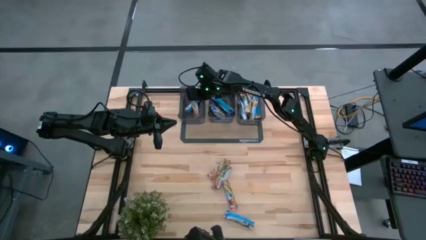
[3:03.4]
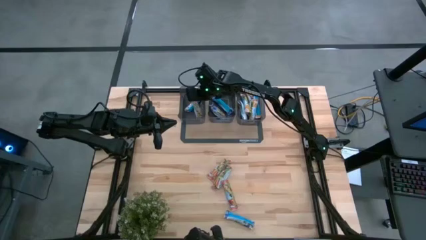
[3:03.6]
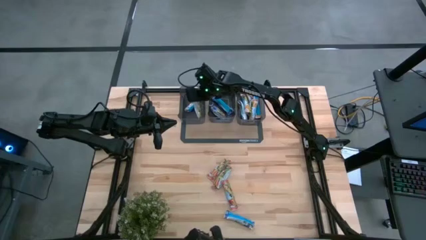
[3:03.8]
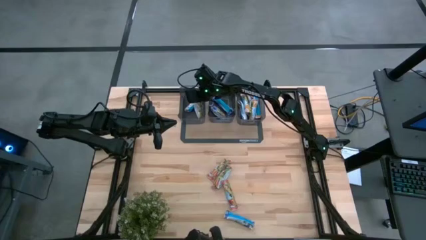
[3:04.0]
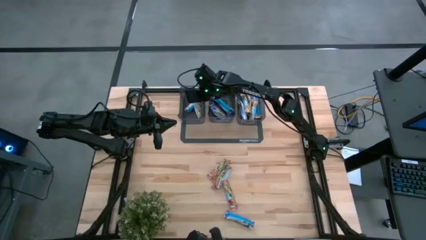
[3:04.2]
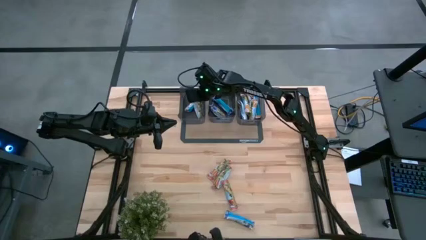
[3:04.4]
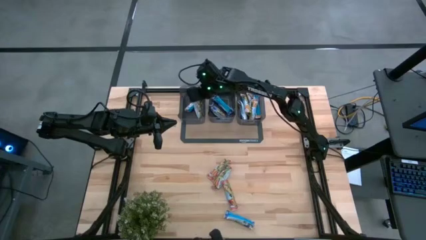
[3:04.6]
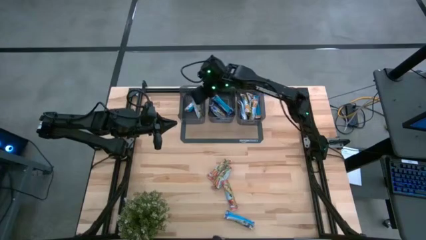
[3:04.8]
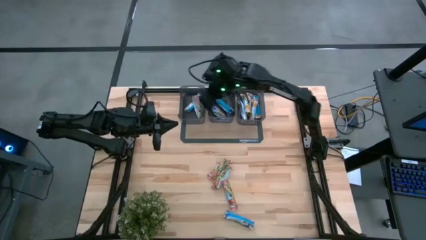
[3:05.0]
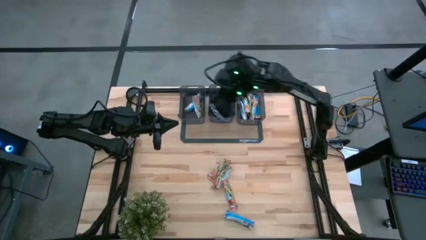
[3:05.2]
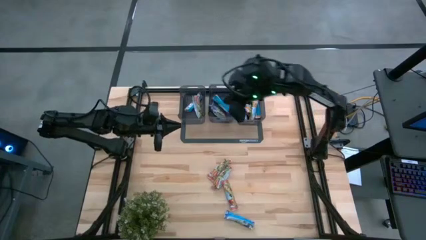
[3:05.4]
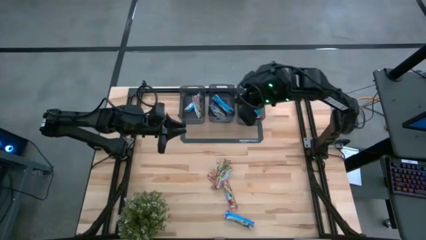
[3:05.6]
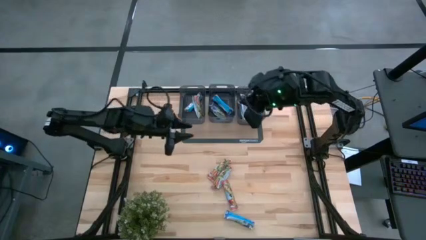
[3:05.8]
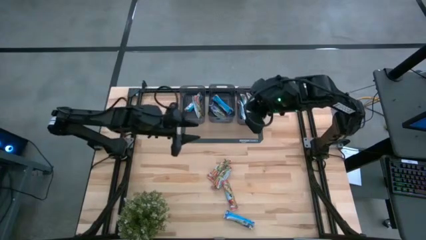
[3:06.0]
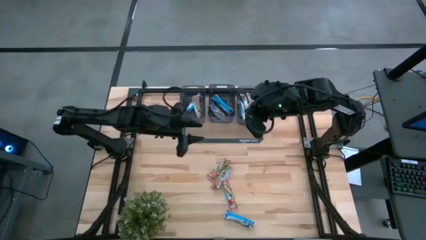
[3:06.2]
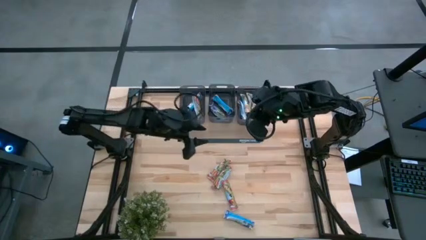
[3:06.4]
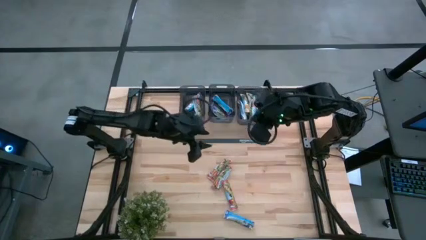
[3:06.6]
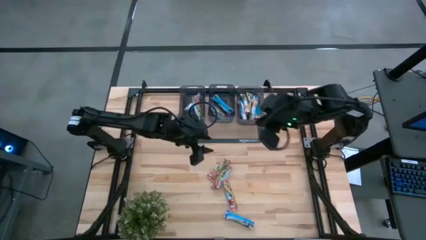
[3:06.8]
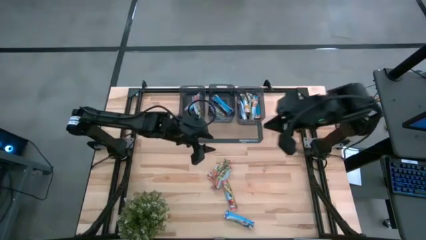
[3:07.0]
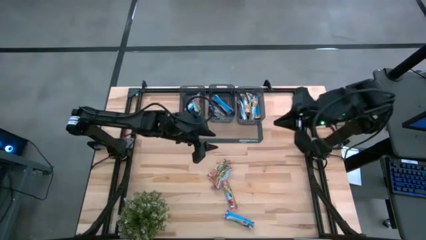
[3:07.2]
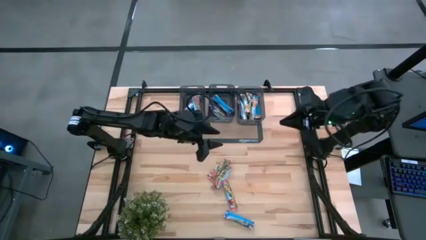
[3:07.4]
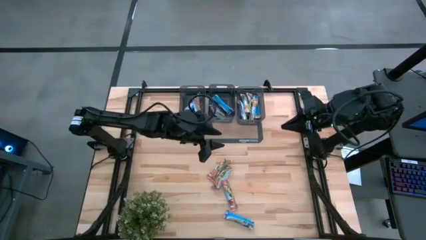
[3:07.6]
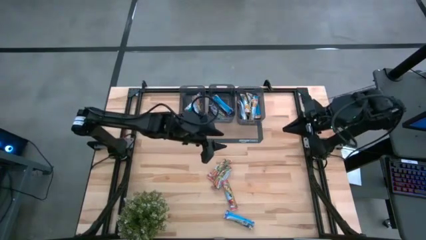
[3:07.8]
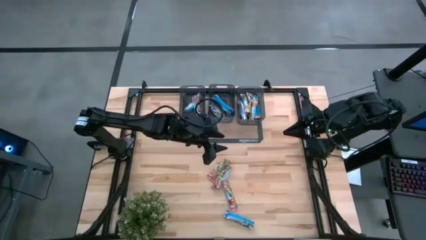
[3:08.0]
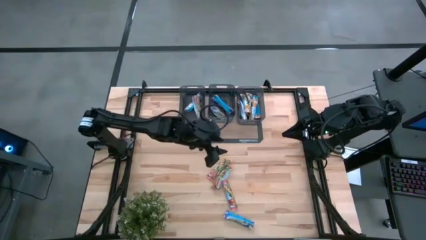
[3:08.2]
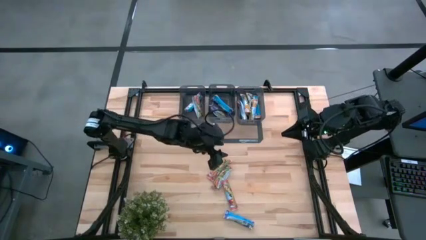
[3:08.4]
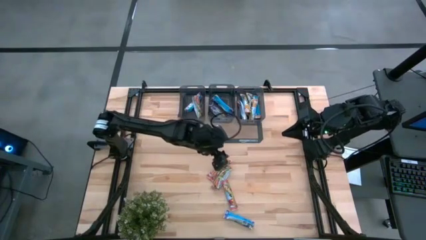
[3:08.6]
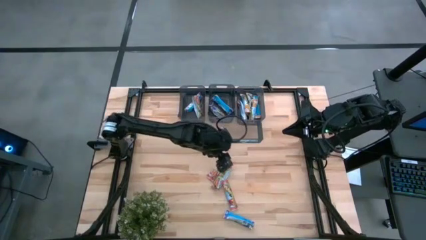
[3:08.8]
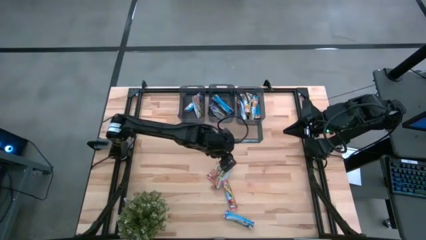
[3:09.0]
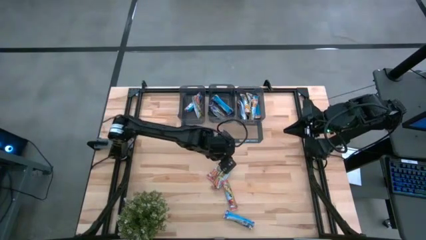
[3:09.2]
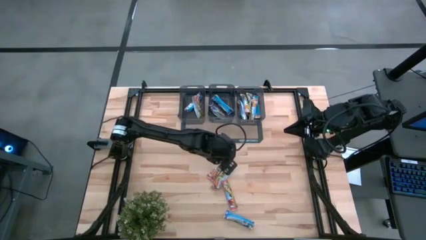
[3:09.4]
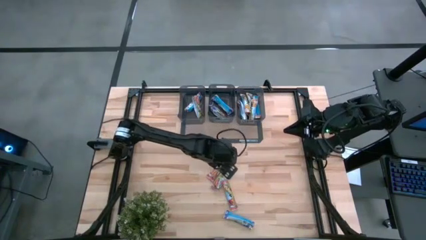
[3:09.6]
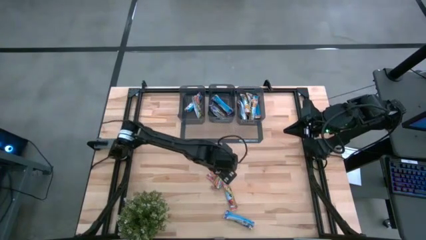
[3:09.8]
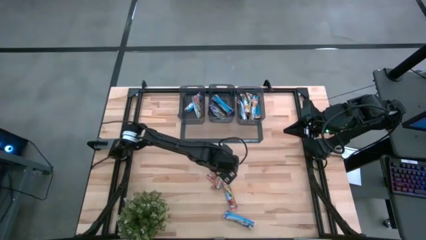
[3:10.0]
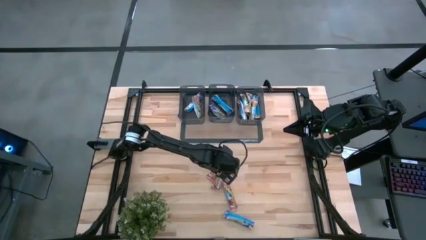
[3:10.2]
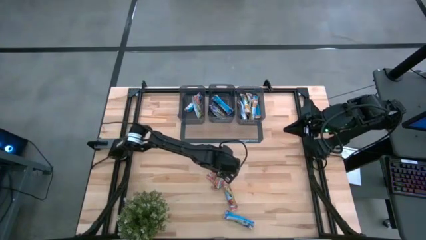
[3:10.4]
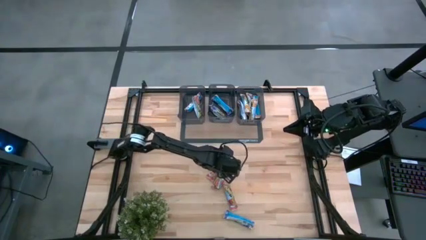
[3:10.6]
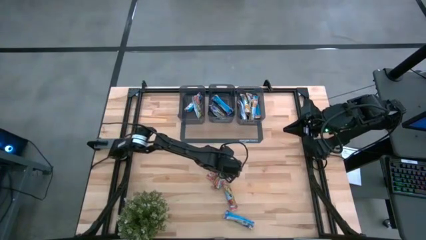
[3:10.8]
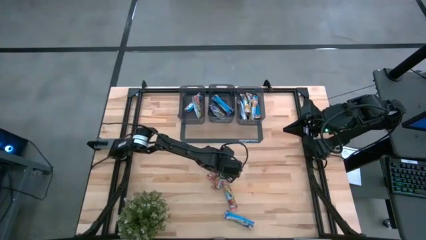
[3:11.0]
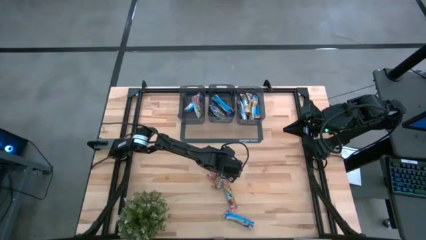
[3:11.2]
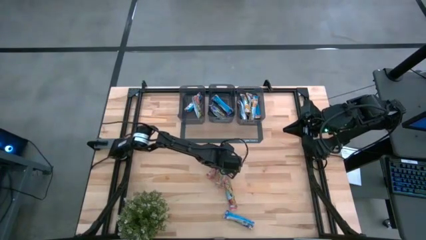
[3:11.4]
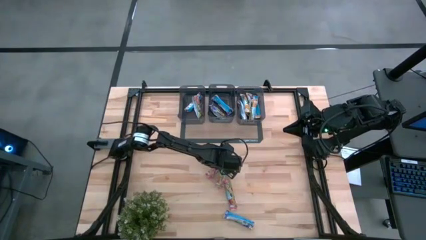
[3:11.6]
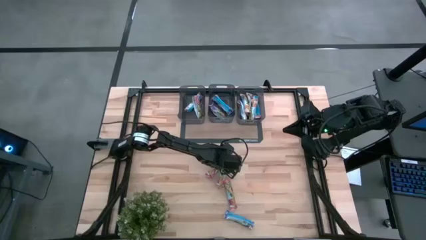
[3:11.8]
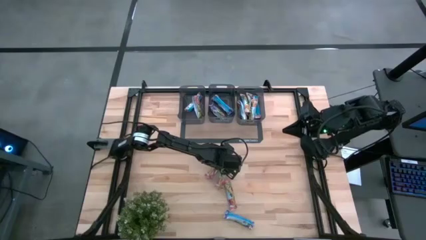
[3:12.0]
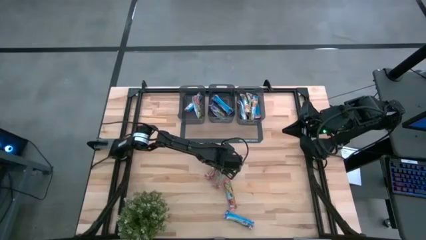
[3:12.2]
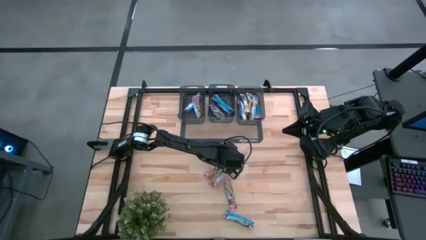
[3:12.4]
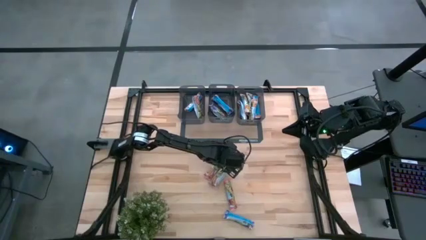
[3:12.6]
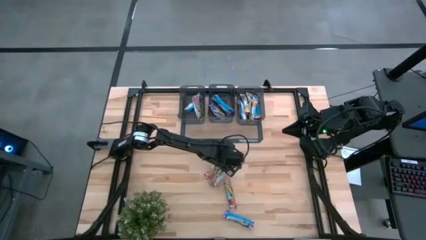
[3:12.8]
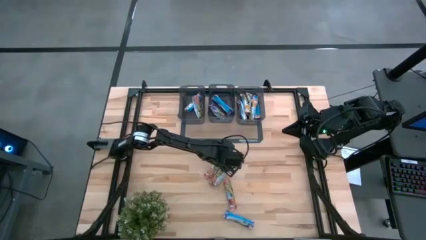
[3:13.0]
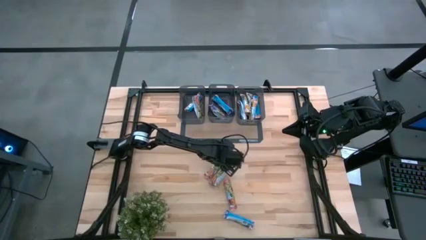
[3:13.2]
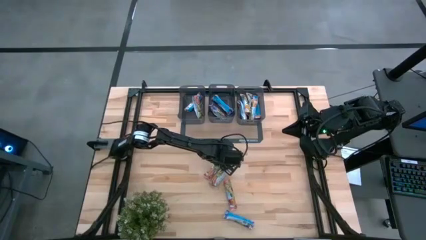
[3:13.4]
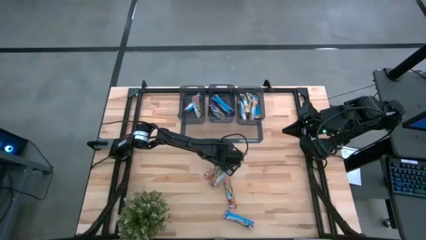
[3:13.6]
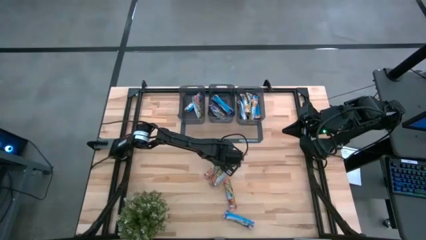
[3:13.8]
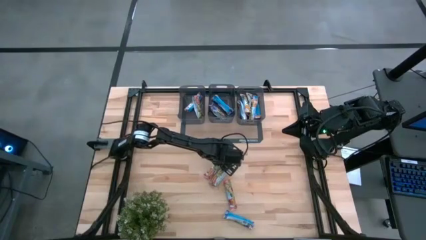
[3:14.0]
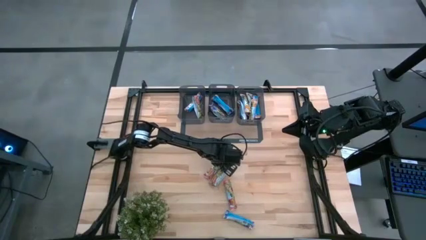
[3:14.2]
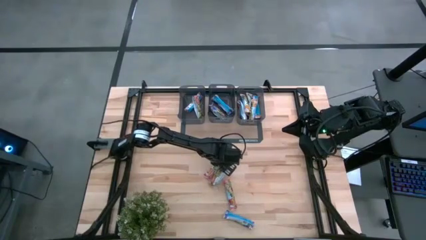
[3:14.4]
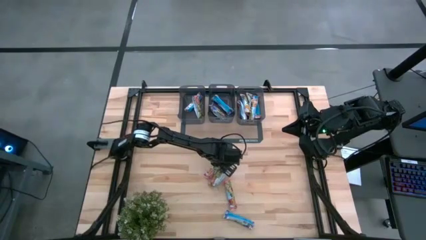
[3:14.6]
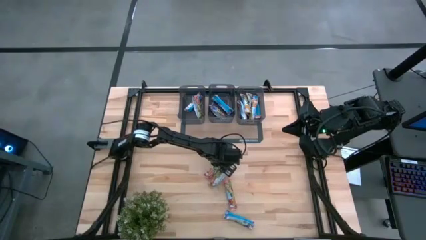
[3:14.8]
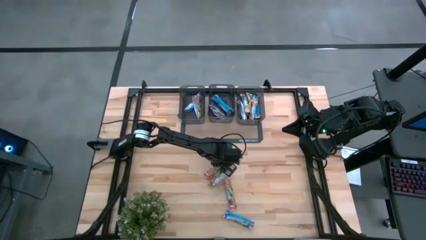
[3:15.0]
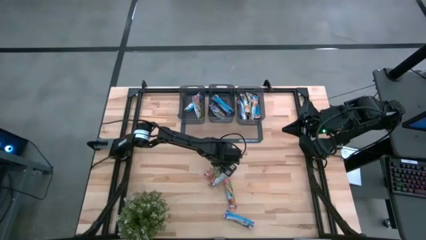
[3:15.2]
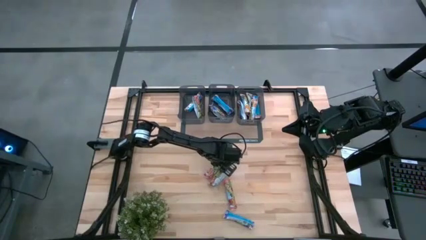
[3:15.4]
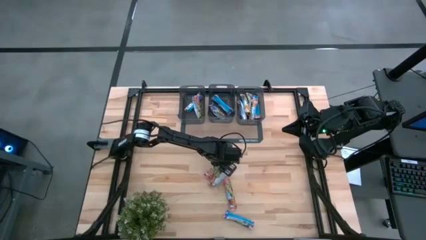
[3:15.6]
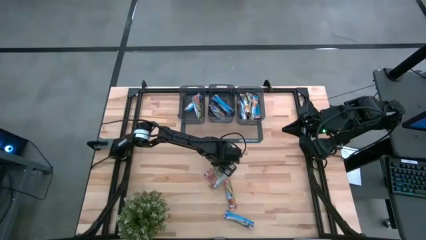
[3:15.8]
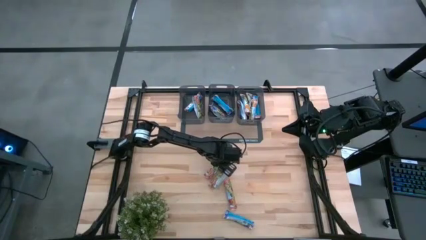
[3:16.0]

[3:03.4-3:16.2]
Task: Pick and place Granola Bars by type
Put the red granola bar into the left black bin

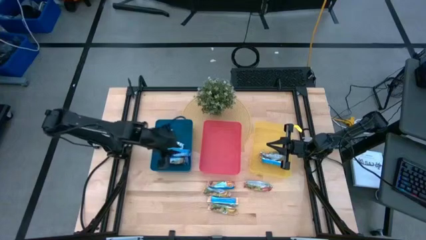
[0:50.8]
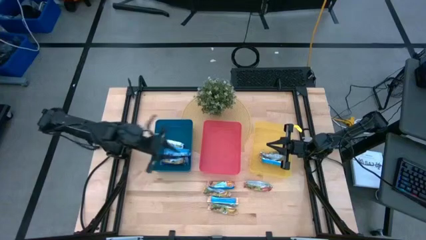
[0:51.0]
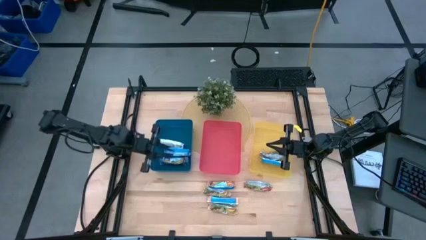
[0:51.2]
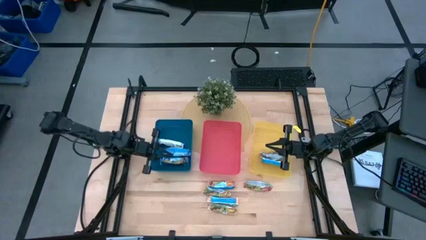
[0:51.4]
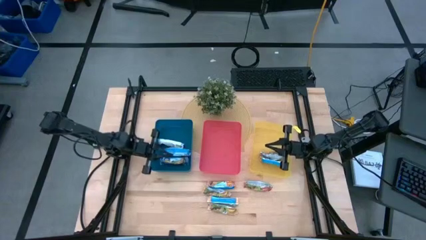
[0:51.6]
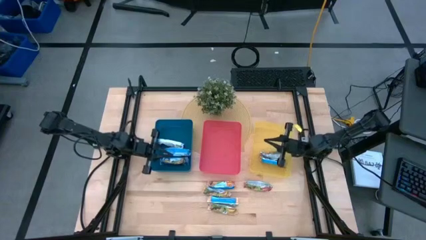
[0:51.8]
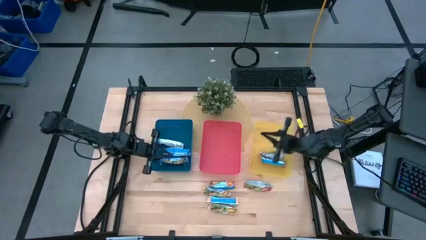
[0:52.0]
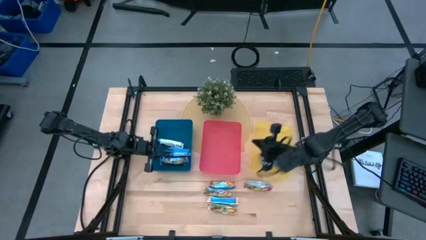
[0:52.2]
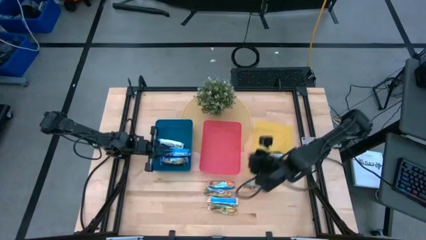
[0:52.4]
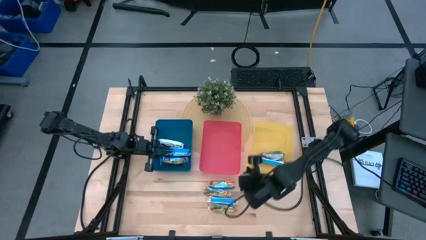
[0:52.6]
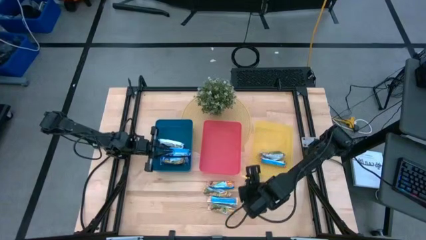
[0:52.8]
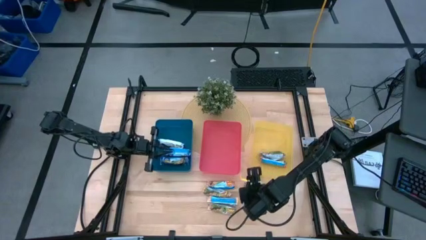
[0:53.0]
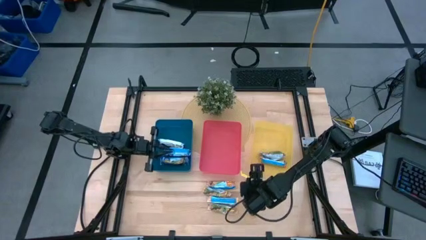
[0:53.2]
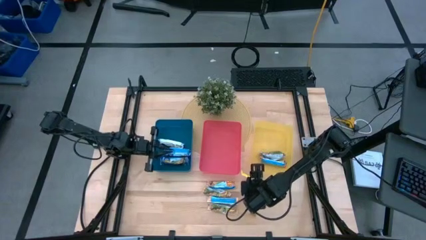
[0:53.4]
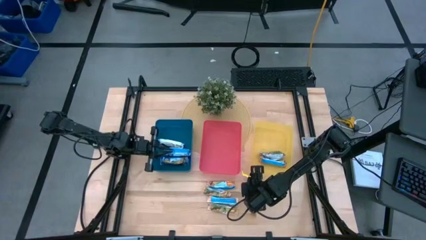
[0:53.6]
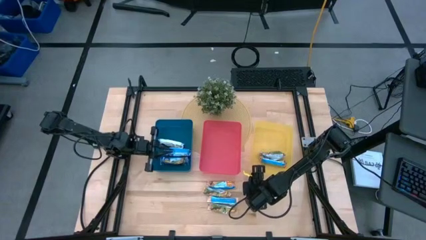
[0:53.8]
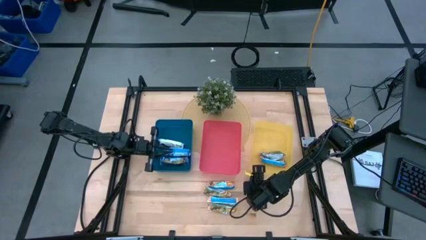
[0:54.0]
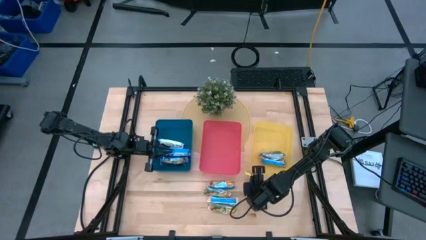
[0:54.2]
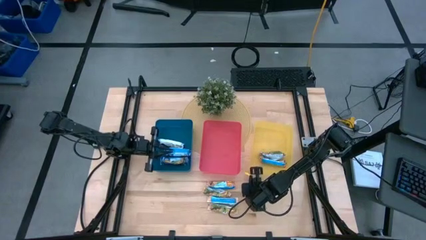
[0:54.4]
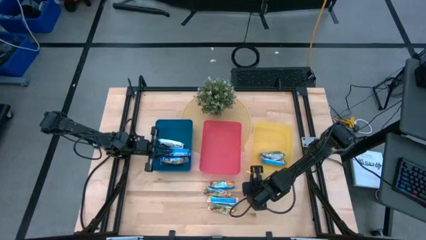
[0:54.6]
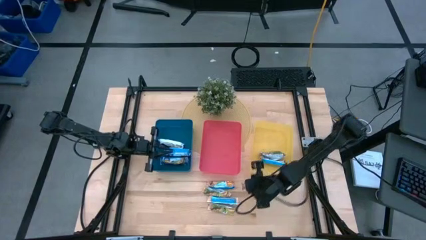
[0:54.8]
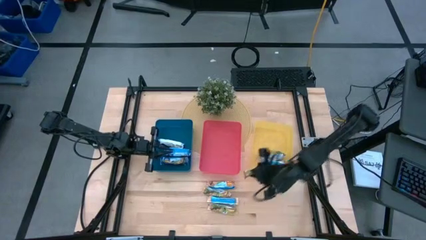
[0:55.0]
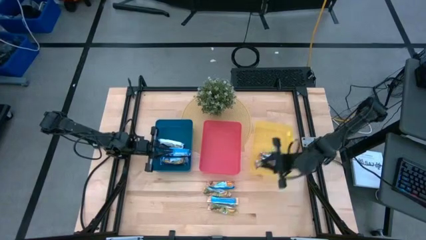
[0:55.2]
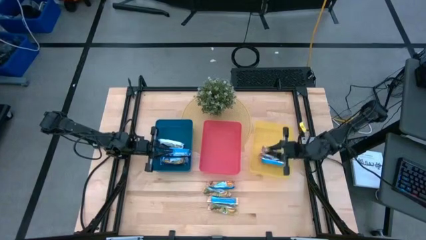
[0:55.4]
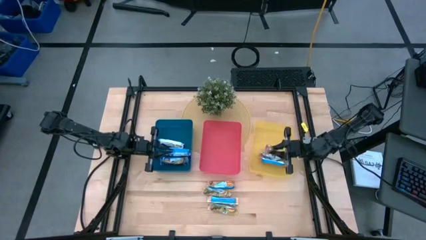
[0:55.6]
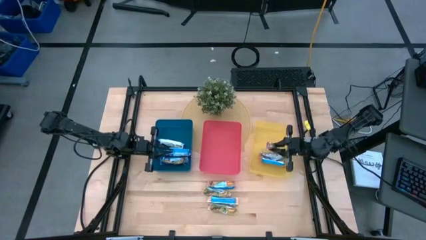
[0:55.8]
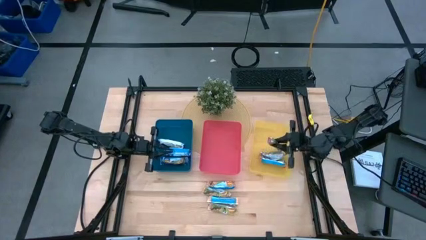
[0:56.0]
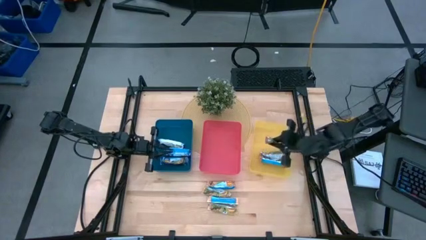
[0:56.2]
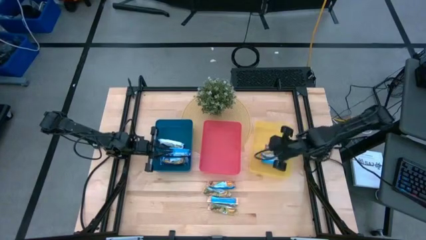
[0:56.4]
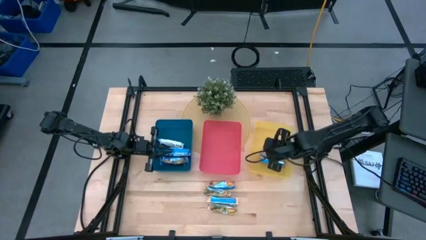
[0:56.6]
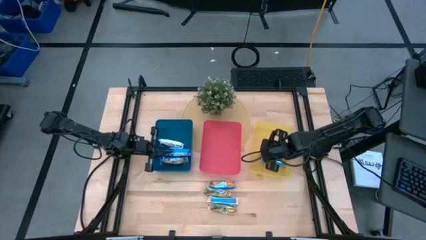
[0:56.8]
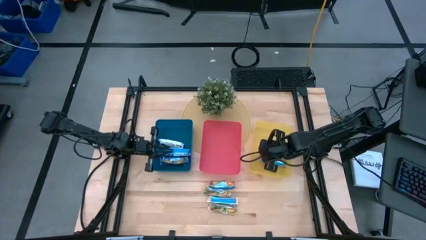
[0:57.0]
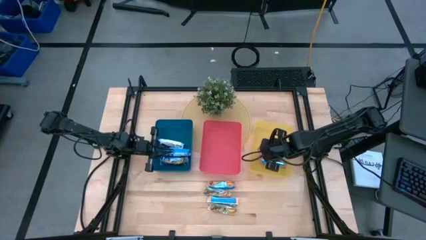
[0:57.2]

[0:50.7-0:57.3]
Task: Pick and place Granola Bars by type
Put the red granola bar into the yellow bin
